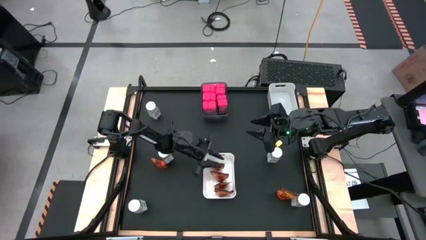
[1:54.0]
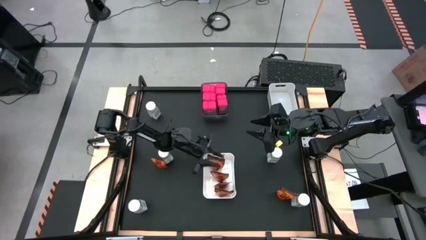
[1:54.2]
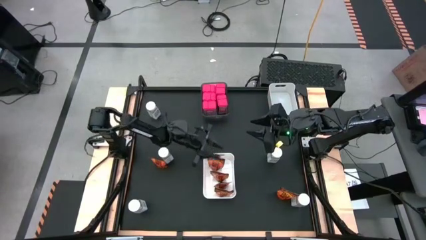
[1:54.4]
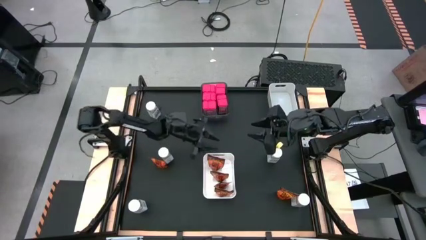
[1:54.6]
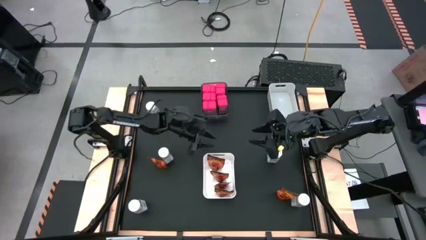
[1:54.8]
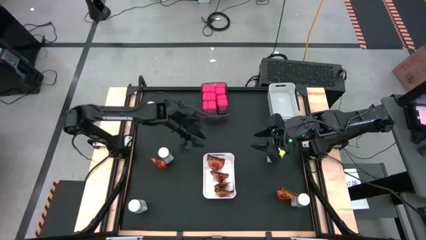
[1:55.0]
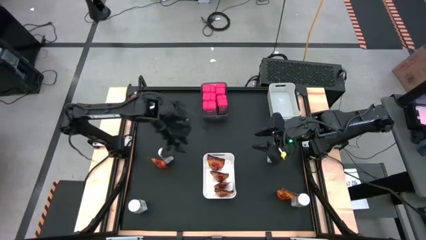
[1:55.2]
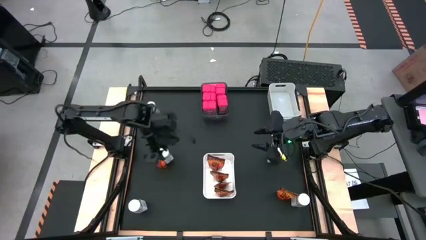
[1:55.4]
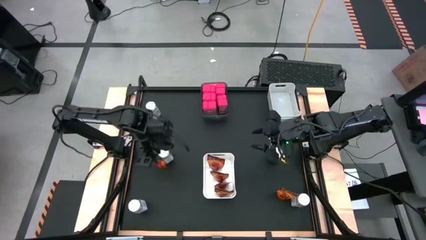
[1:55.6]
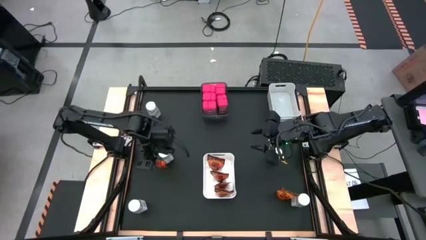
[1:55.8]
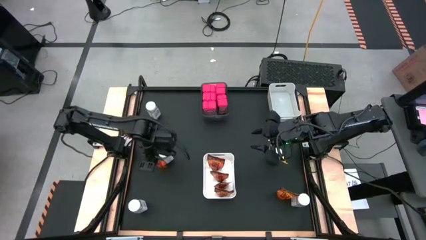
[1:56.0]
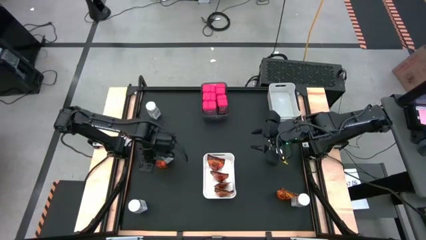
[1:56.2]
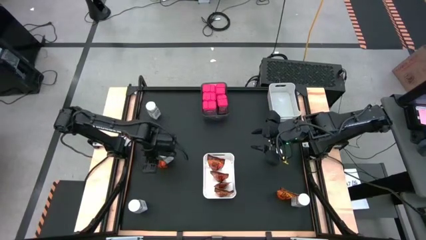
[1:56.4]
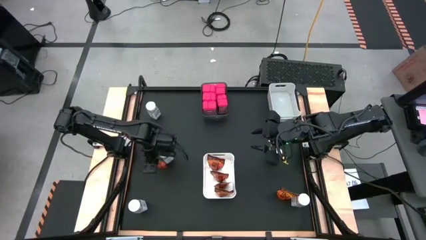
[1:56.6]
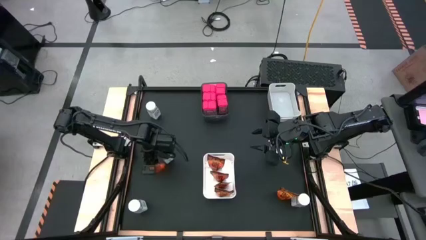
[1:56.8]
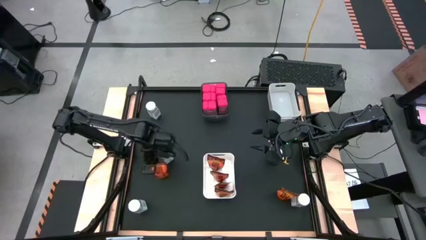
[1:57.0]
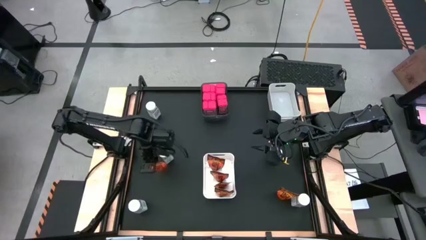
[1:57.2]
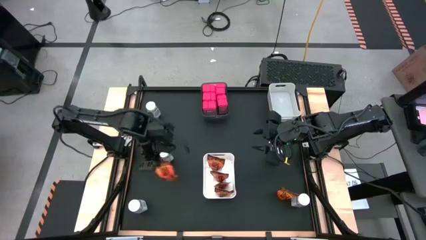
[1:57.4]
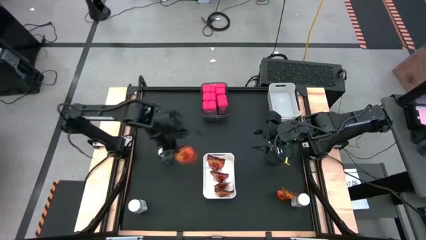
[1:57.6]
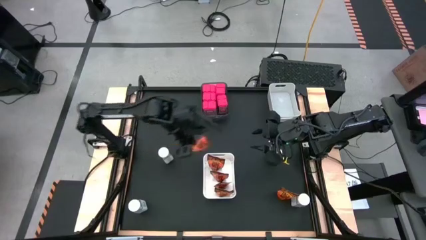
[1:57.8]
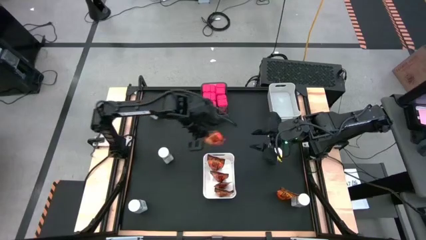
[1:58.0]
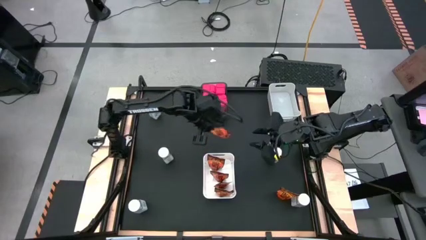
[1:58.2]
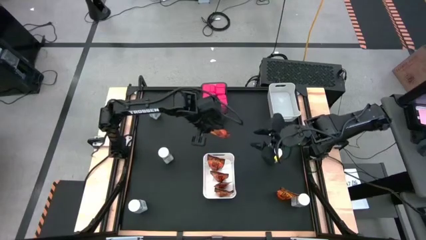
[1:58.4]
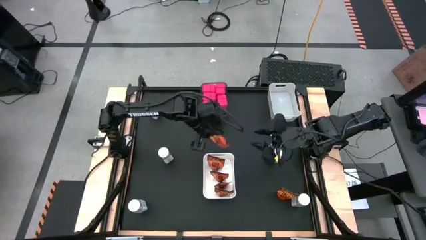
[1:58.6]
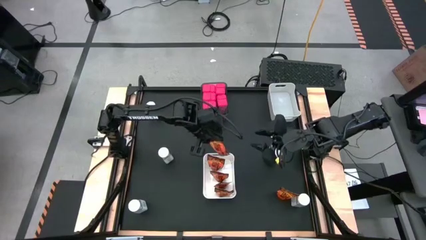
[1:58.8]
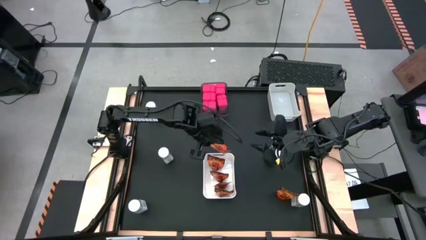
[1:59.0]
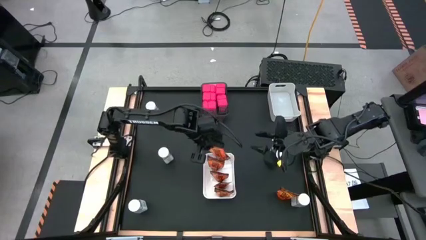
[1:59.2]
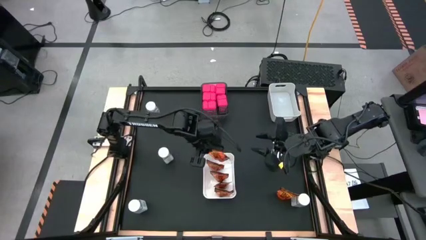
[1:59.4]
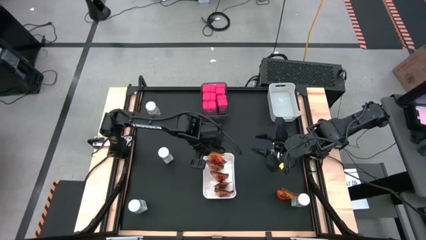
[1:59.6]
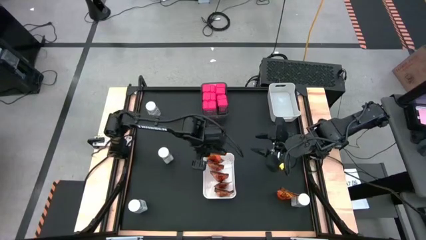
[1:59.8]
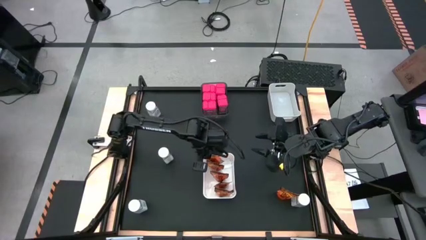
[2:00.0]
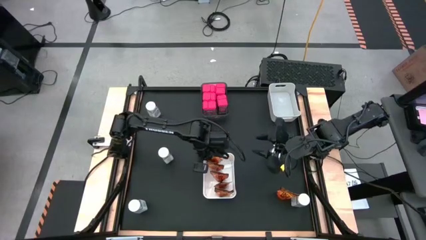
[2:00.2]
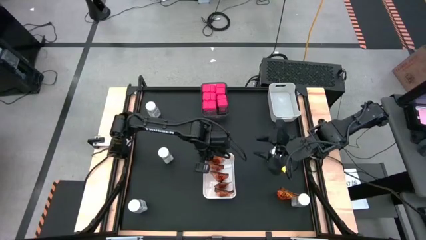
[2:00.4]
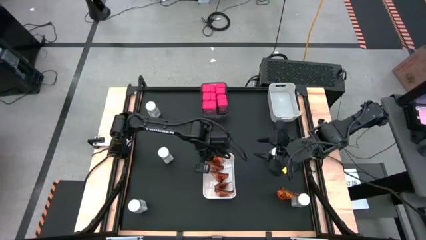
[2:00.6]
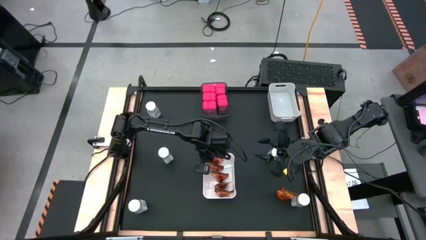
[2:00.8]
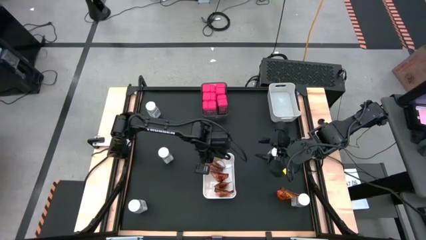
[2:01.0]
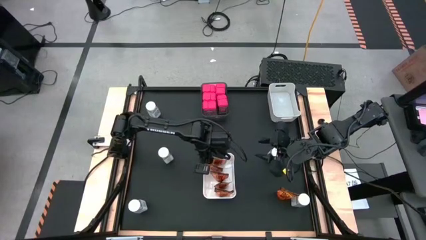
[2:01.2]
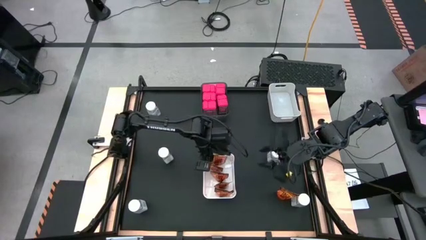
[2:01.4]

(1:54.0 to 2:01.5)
Task: Sort spices by type
Put the orange seasoning pack into the white bin

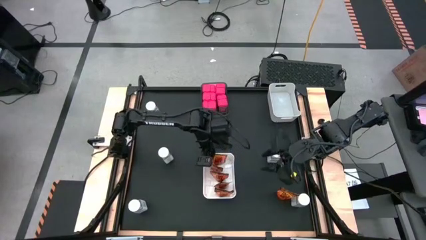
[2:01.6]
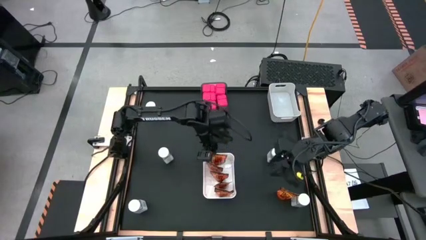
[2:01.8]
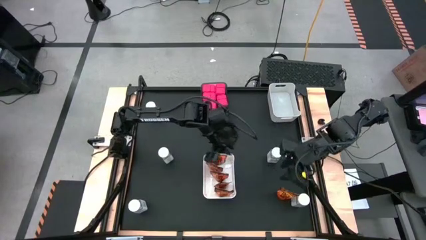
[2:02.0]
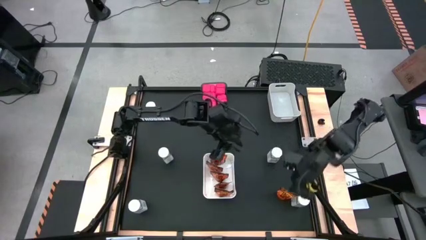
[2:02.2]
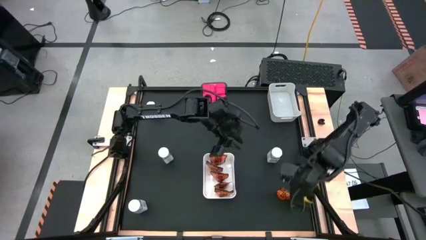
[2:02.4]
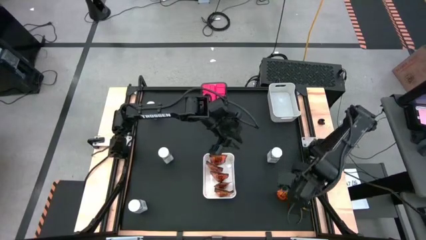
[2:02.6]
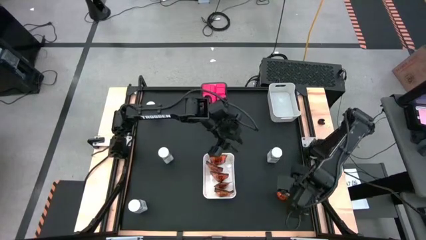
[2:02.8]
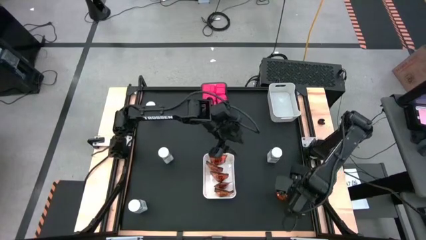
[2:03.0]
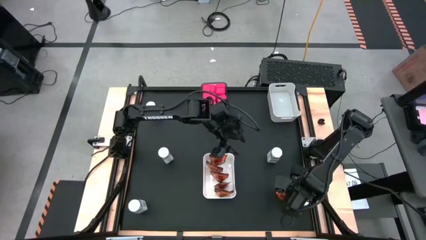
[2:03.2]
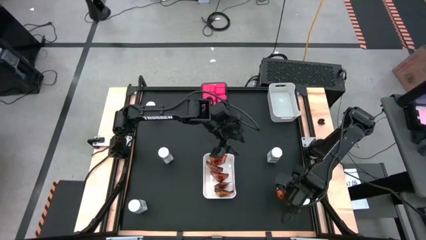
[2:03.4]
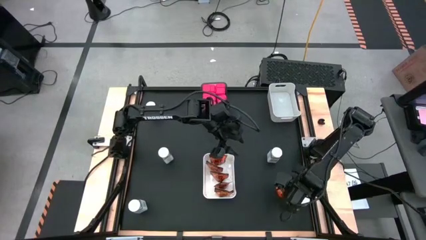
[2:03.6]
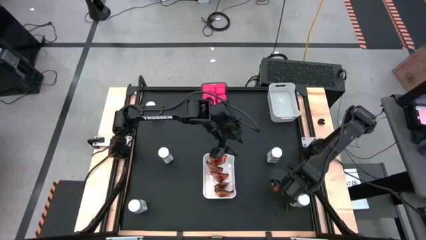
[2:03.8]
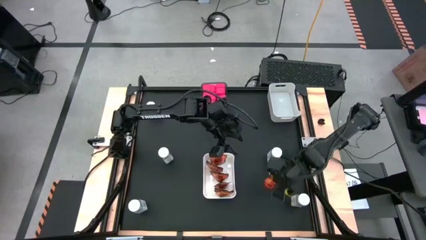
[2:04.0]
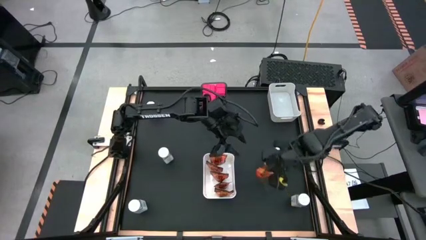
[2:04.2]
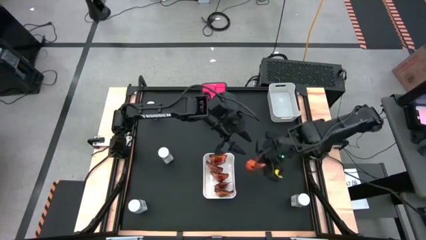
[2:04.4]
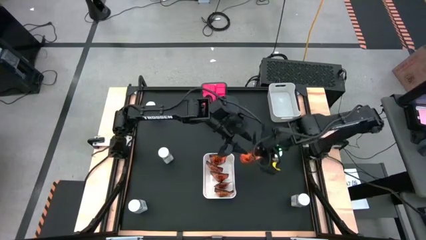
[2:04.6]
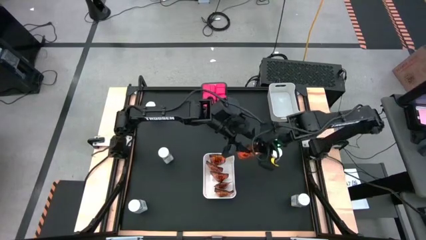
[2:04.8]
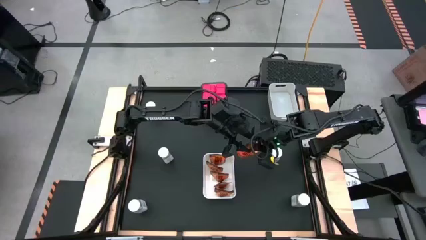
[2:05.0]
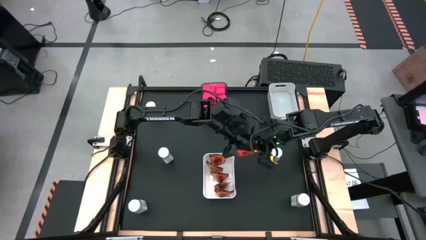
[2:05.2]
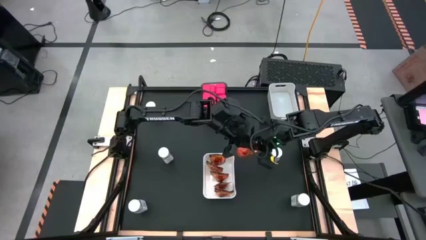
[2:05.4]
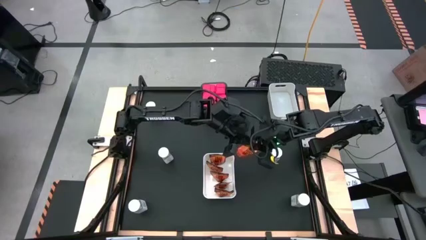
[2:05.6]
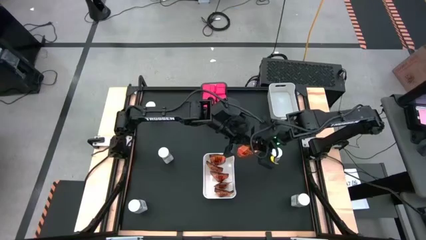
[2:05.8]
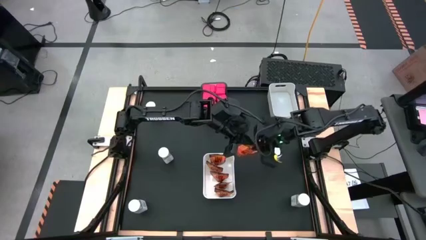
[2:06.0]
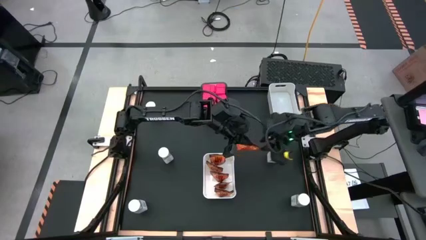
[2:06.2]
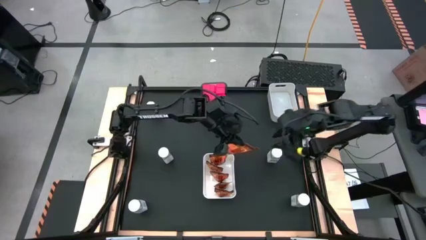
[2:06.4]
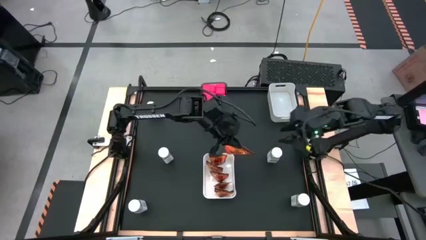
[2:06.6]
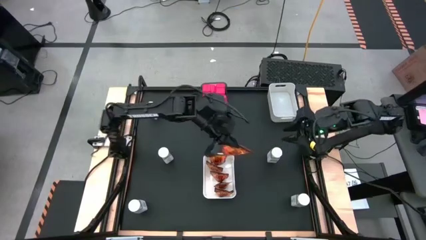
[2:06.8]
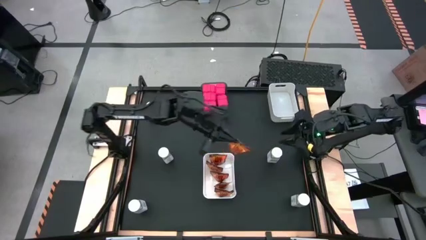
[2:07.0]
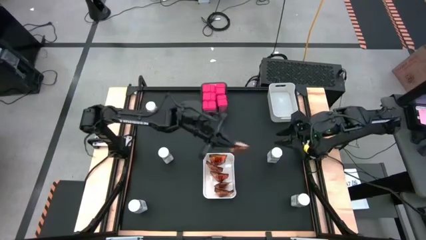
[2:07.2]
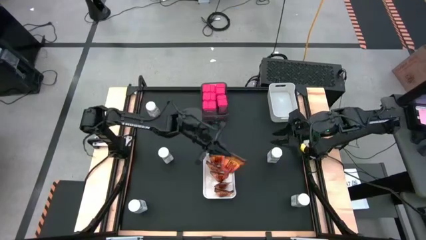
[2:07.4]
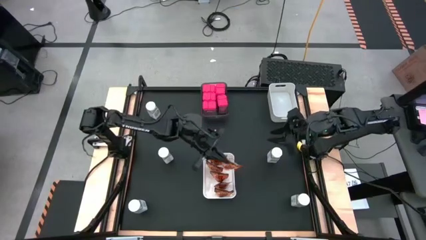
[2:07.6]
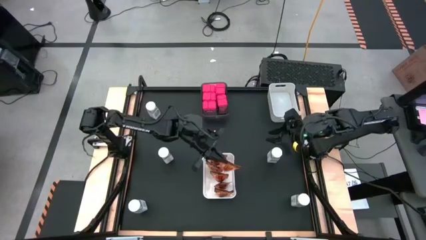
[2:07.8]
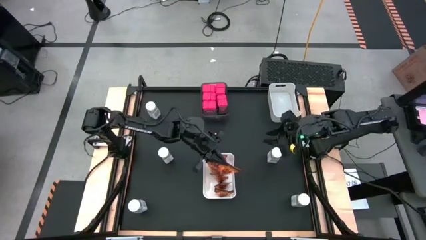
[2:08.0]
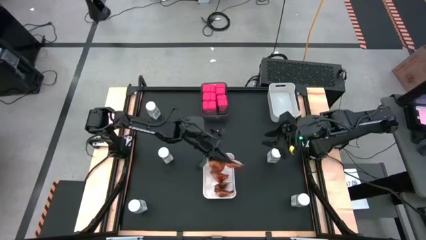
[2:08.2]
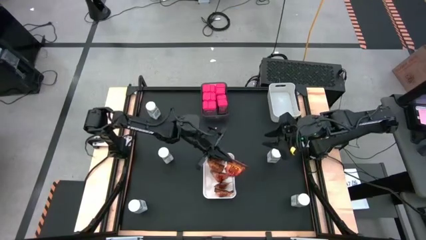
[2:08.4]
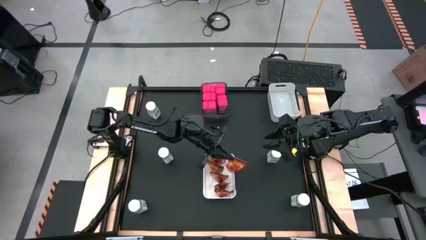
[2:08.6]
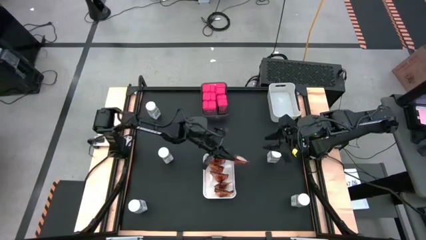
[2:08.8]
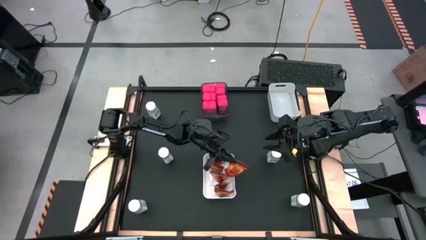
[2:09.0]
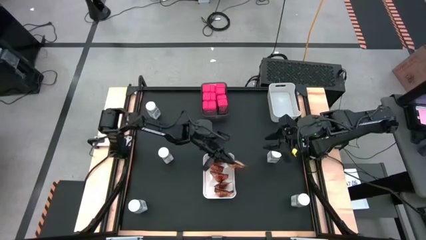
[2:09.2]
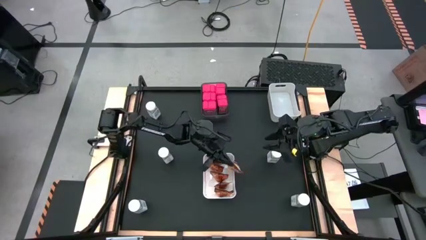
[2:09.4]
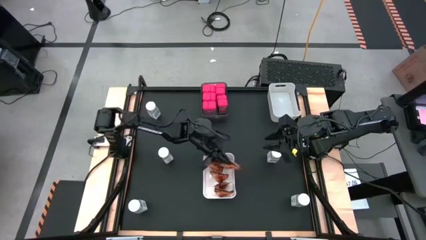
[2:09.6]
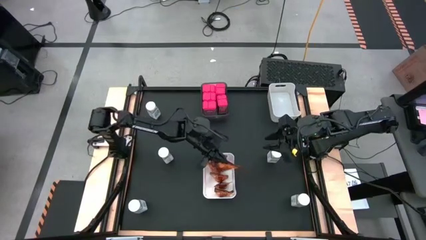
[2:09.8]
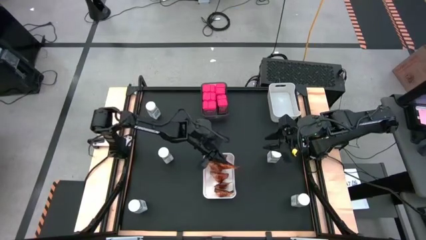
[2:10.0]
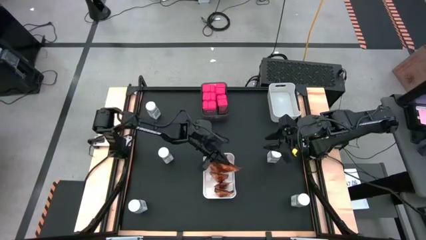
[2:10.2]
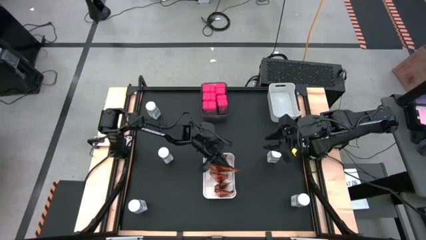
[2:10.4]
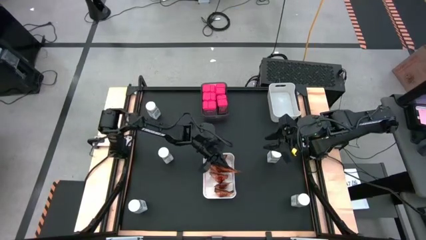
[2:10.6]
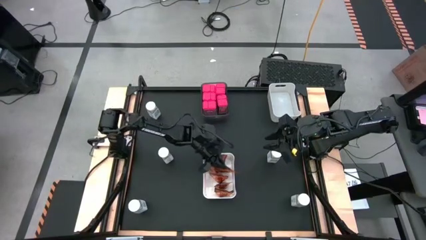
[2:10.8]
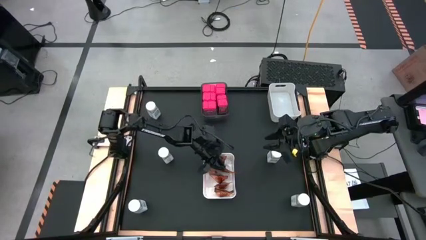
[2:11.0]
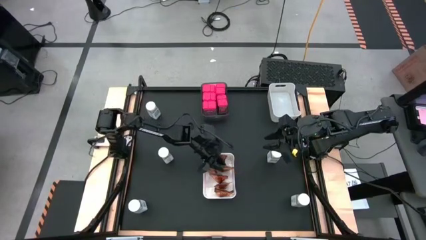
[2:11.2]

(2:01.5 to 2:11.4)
Put the orange seasoning pack into the white bin
